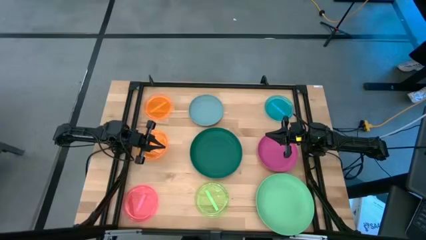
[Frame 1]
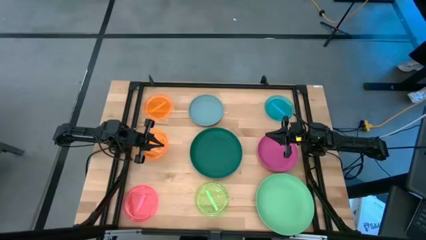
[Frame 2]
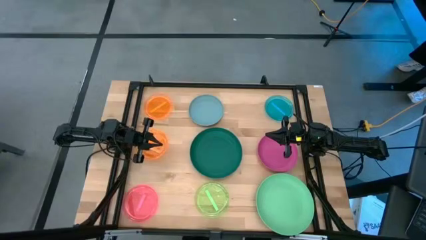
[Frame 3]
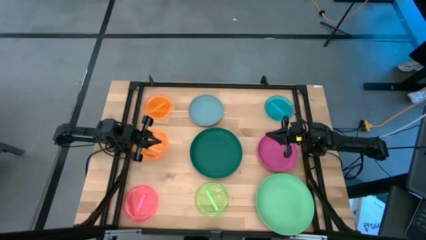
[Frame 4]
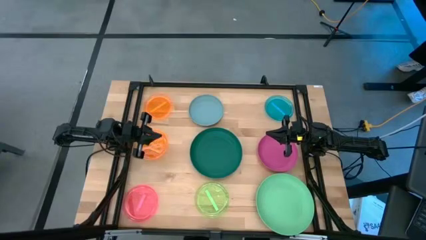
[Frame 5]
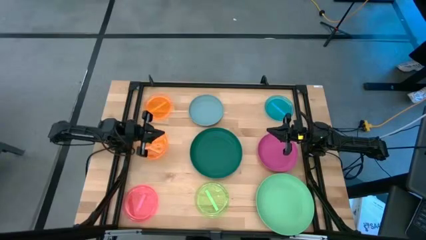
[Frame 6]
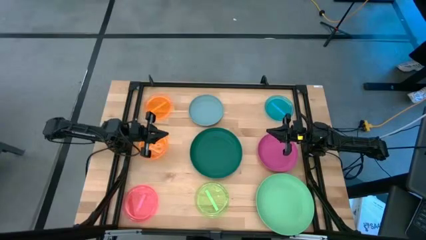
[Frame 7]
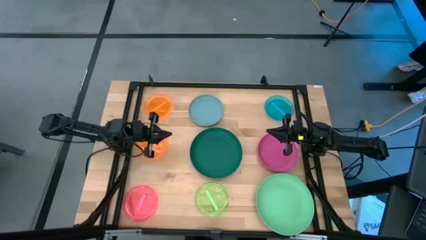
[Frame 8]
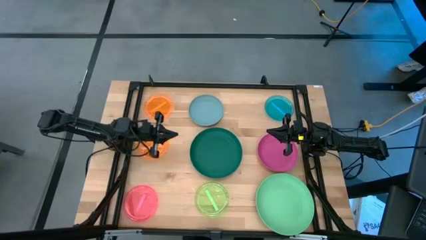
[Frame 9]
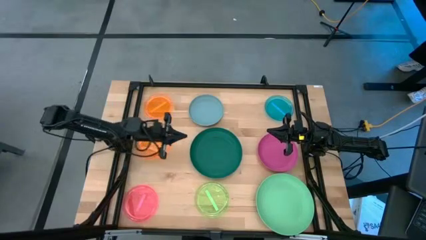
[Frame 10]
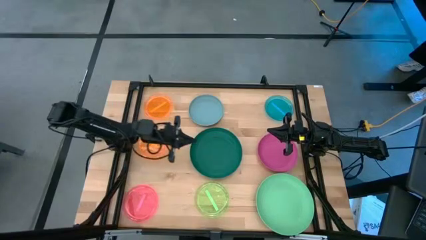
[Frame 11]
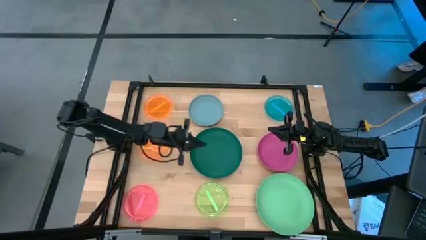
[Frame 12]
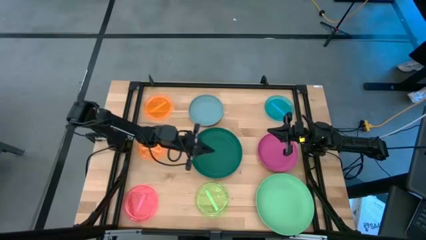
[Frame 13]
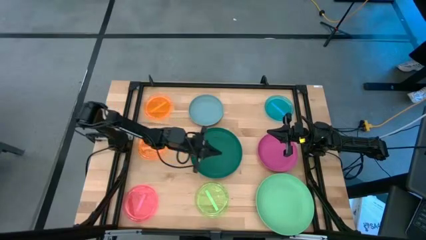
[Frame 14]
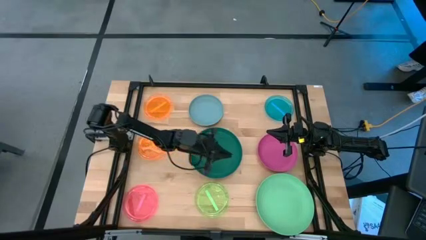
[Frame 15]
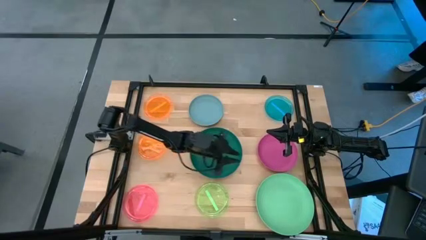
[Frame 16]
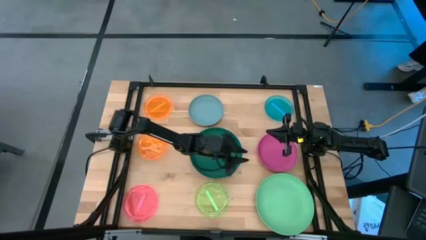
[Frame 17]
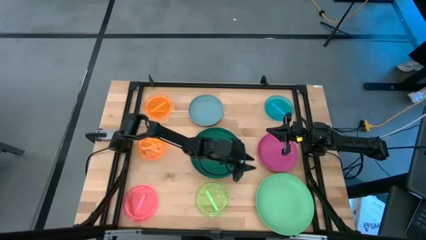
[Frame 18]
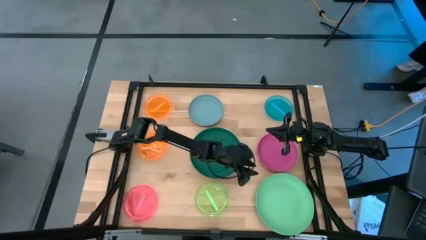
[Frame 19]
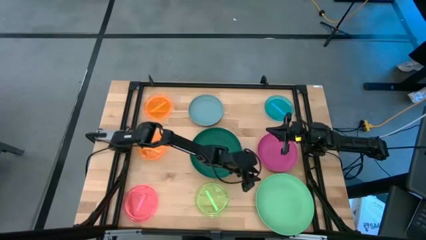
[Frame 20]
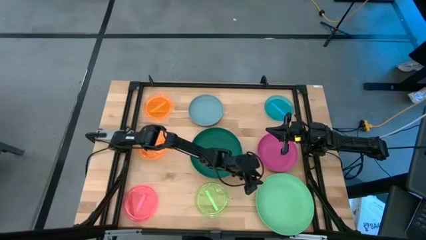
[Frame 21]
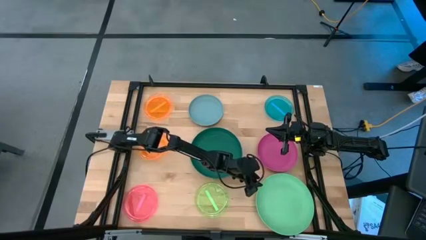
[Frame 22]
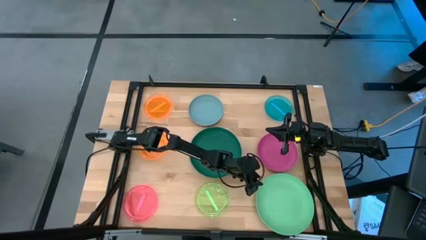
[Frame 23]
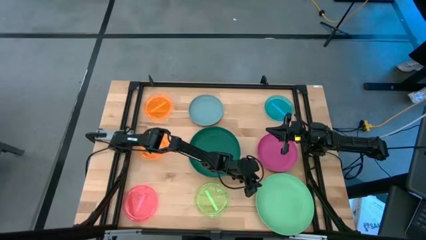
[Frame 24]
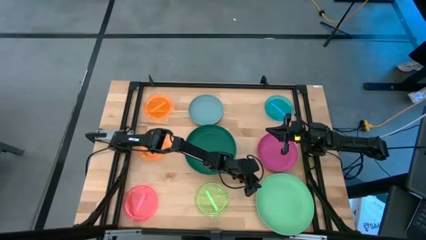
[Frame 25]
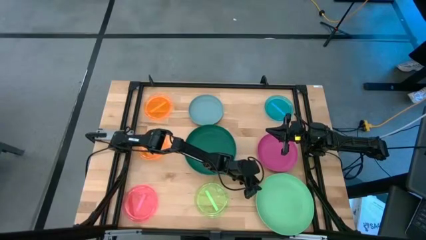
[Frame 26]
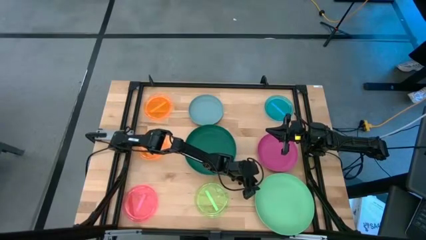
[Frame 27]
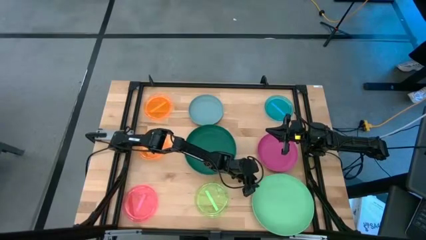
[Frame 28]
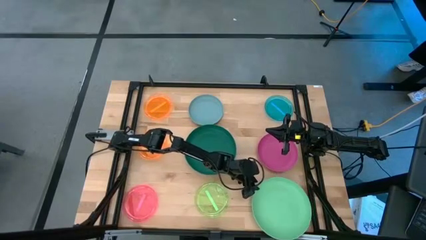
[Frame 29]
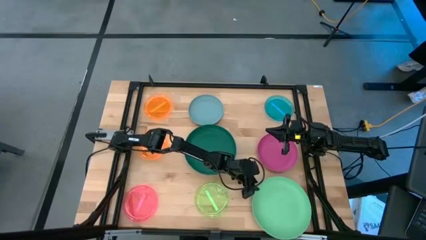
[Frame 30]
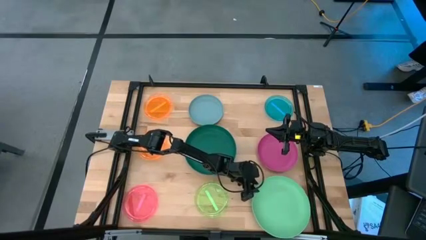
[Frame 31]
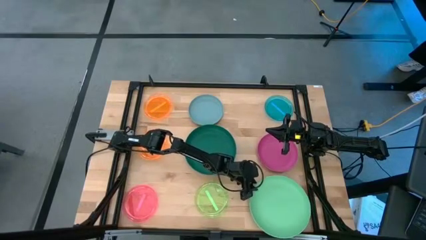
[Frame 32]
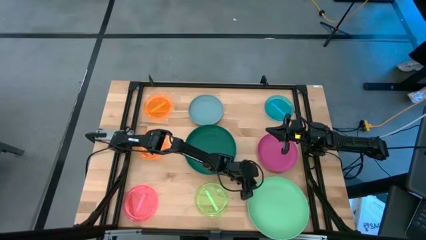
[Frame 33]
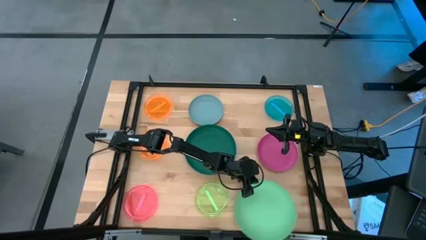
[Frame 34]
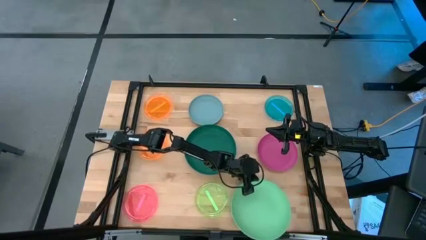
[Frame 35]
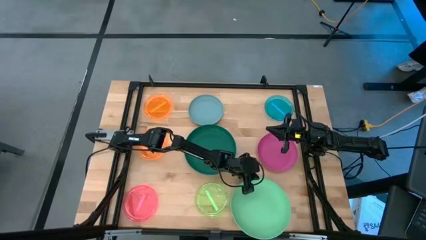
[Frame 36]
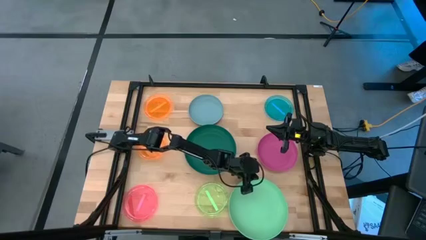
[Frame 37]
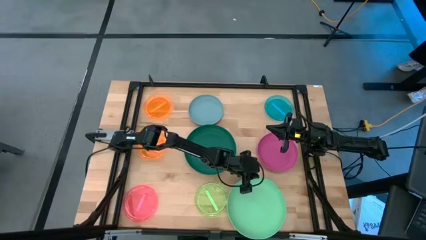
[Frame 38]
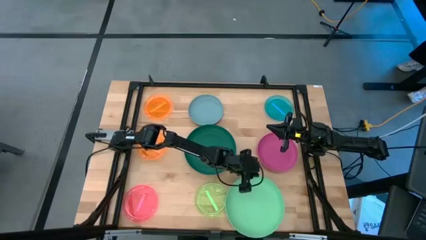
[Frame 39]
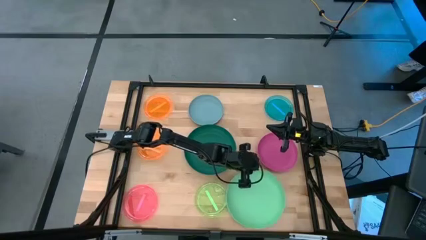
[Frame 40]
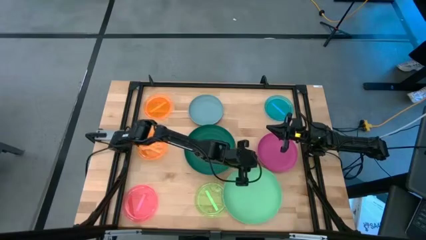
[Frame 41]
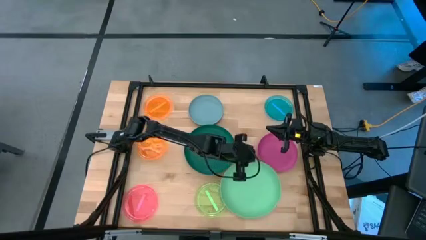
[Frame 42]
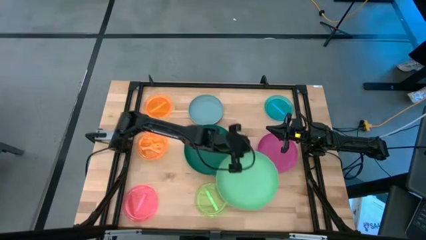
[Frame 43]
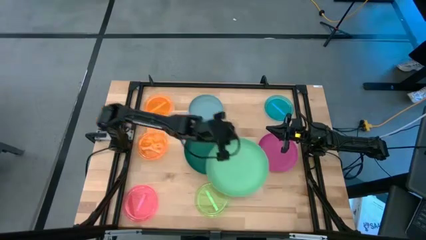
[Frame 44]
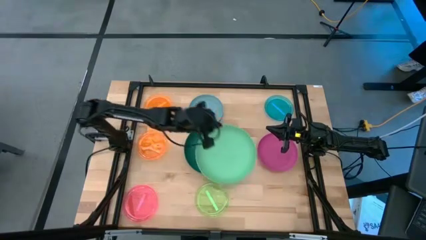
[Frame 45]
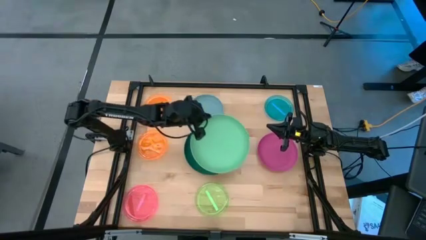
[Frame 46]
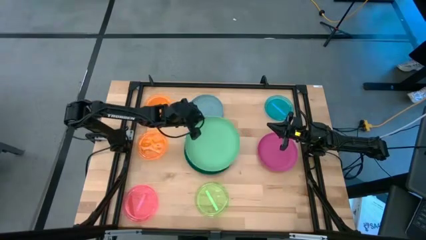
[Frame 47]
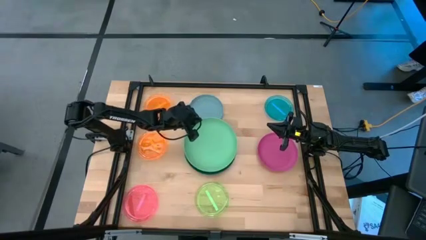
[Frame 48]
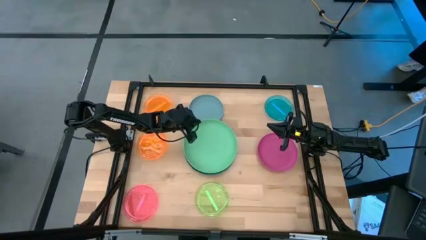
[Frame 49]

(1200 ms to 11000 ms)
Task: Stack plastic plates
Stack the green plate on the dark green plate

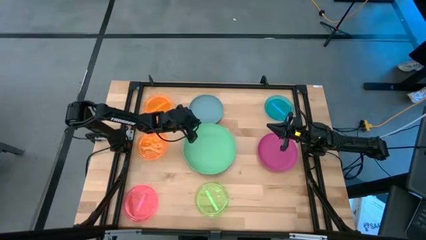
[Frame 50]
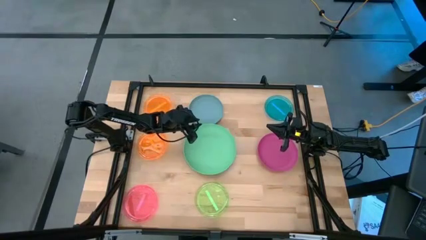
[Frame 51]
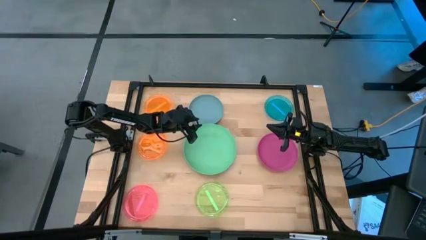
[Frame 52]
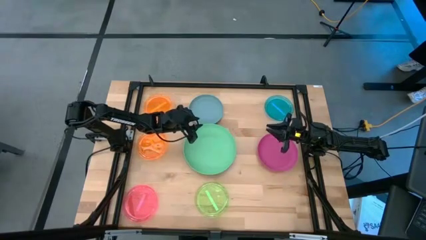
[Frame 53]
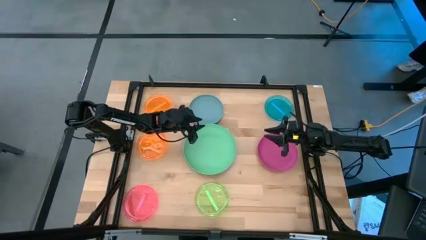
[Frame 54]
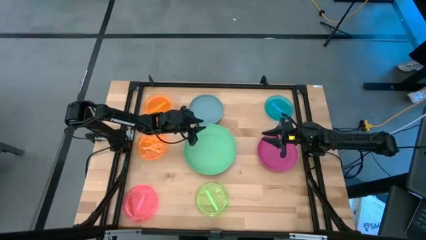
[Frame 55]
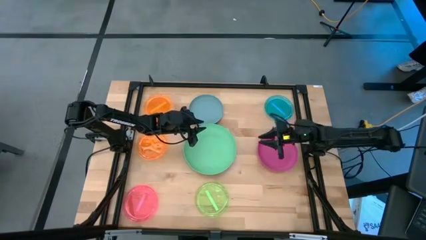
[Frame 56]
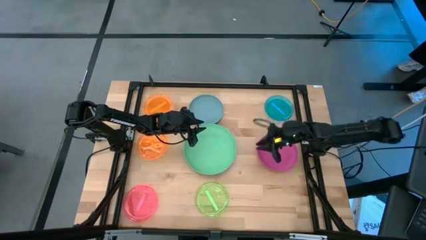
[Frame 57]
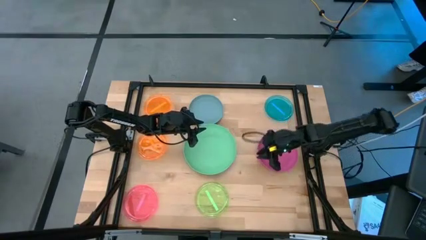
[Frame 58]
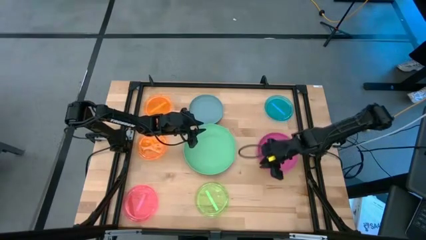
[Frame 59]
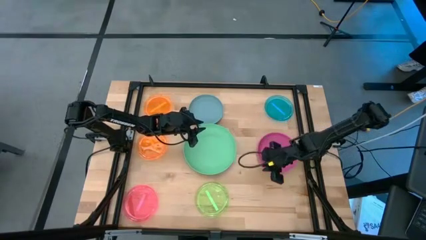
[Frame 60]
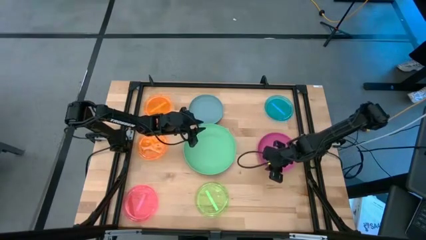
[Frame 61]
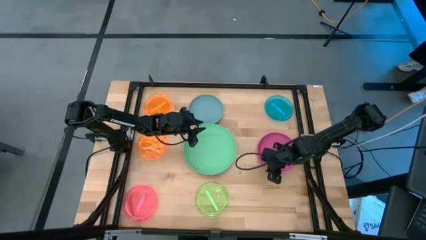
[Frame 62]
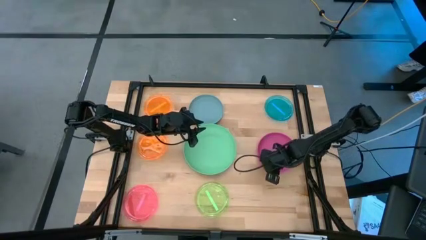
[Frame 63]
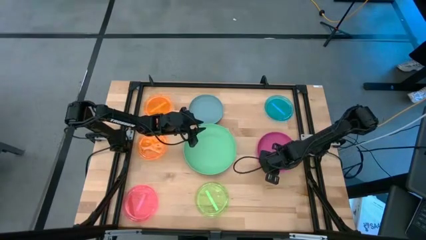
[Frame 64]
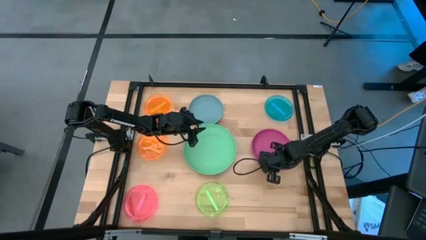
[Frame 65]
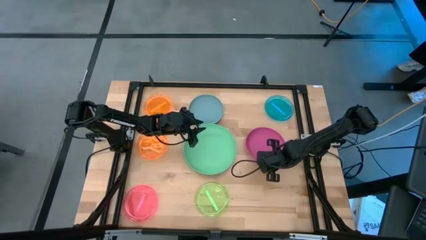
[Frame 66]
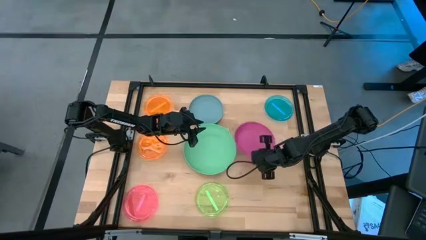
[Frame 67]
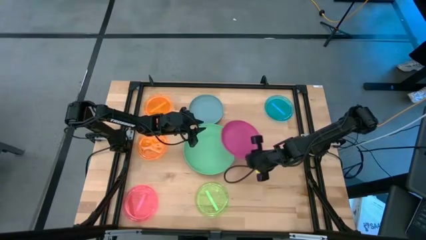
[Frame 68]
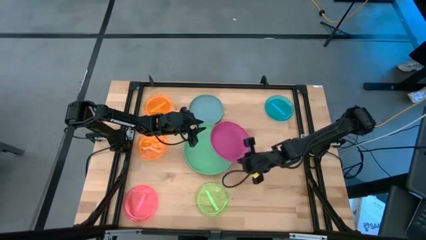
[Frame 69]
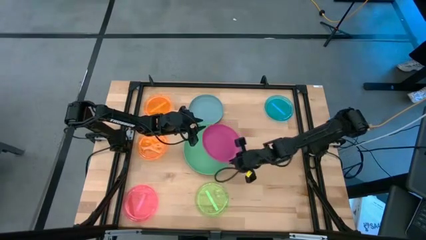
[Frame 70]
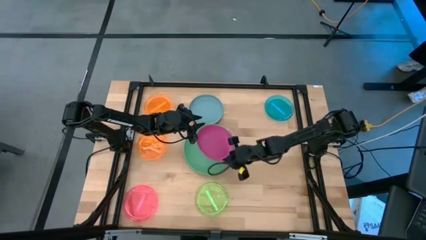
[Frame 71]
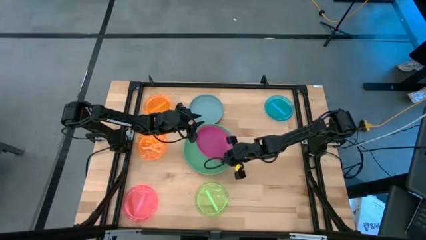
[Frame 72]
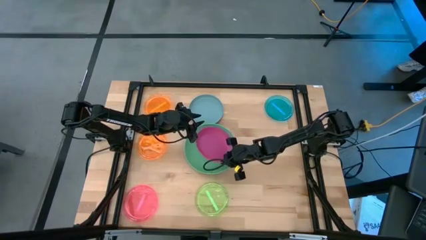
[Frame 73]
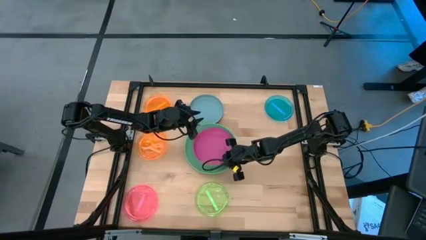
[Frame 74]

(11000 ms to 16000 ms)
Stack the pink plate on the green plate

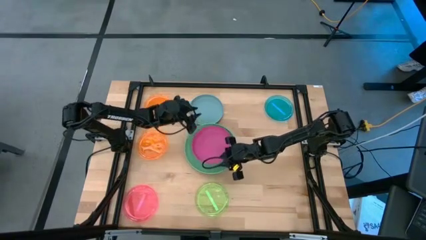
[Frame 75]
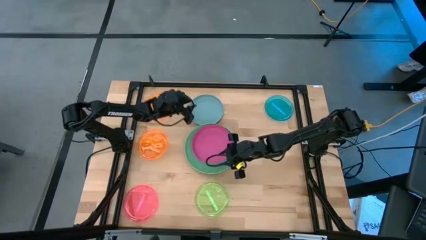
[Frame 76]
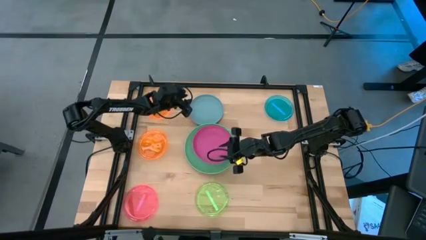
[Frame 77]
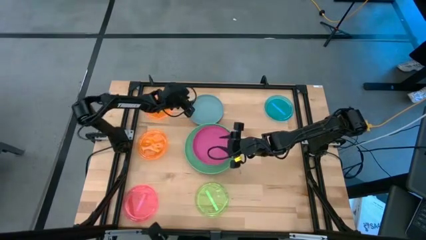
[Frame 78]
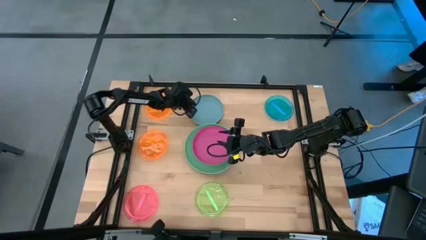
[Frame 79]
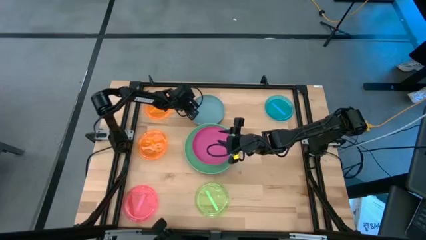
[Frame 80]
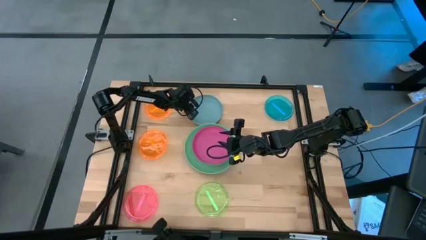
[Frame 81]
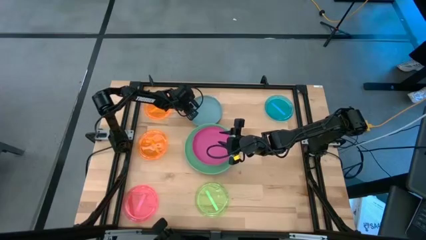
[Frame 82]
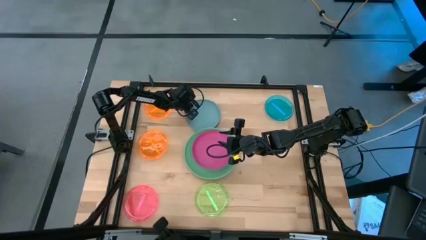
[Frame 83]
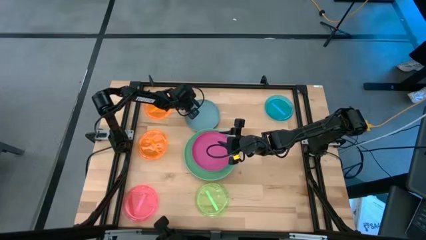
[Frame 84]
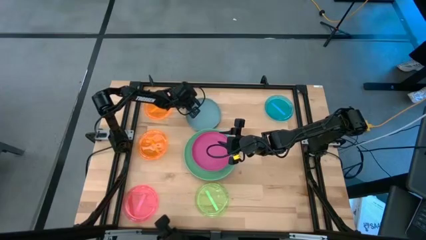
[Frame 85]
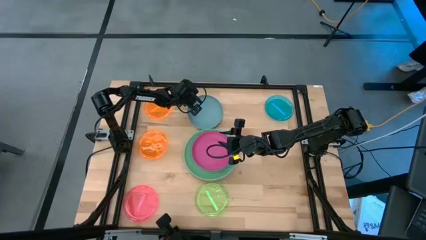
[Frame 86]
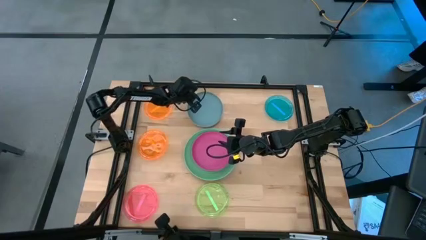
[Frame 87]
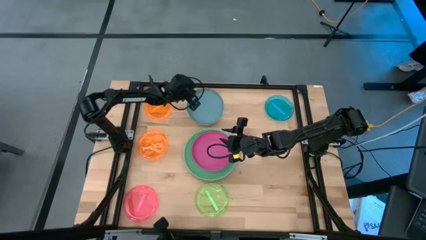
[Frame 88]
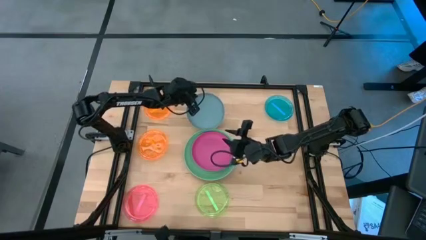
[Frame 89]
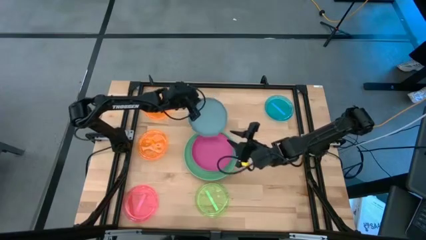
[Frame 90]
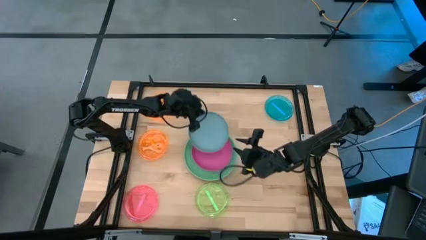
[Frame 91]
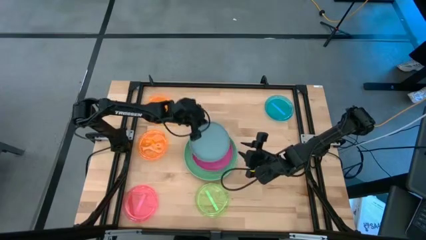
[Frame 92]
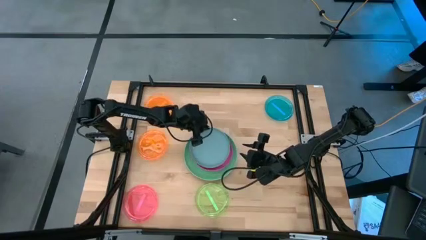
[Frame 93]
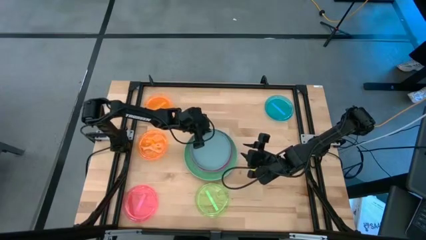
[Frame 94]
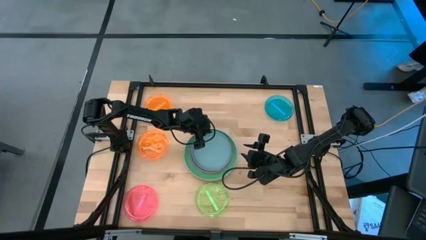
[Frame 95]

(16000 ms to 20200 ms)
Stack the light blue plate on the pink plate
